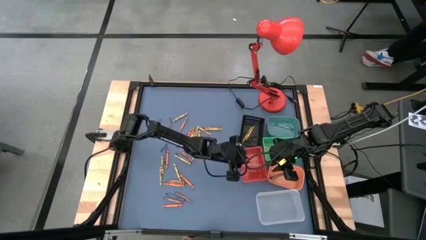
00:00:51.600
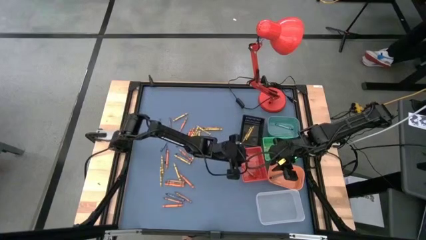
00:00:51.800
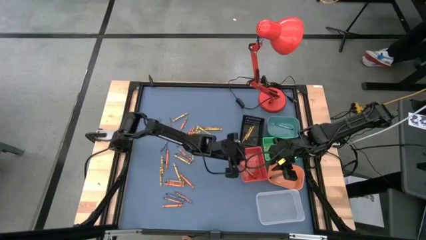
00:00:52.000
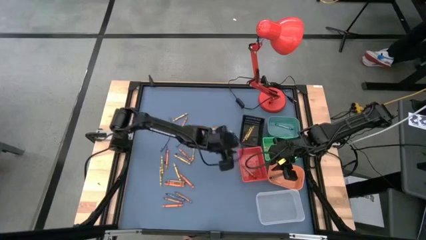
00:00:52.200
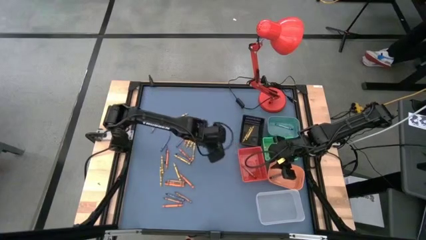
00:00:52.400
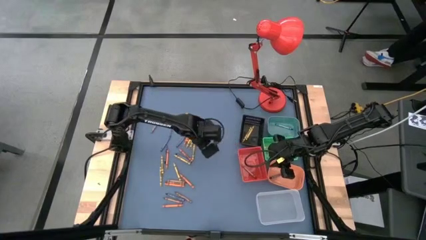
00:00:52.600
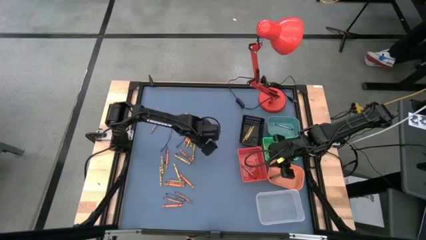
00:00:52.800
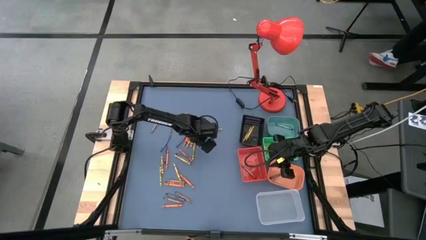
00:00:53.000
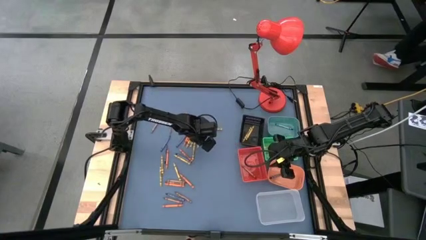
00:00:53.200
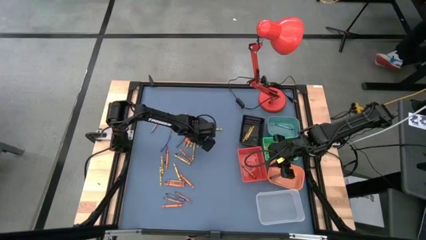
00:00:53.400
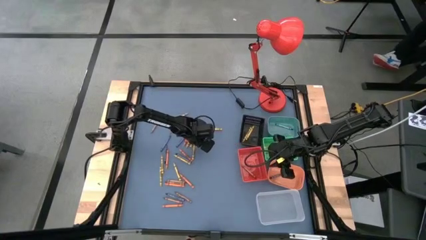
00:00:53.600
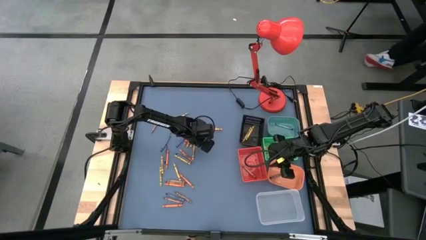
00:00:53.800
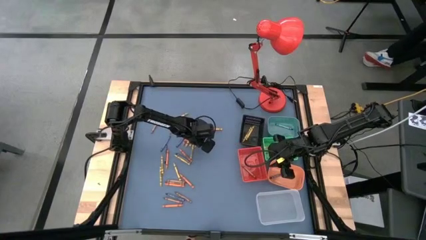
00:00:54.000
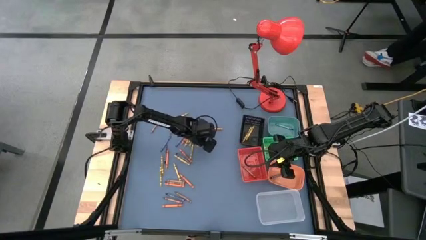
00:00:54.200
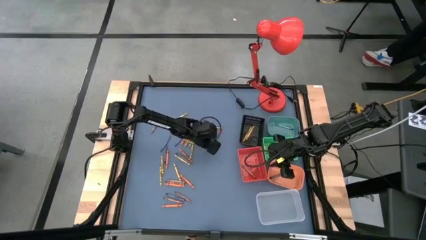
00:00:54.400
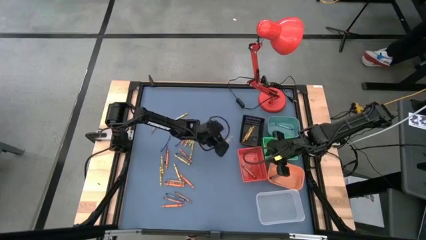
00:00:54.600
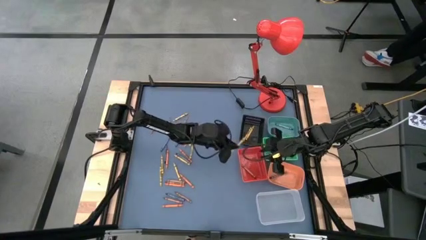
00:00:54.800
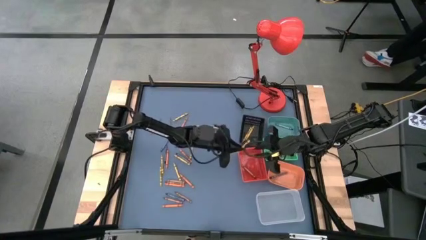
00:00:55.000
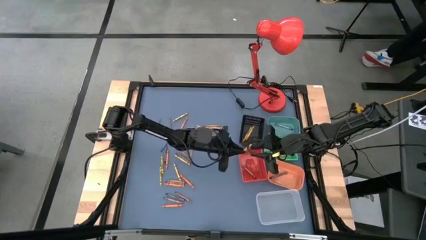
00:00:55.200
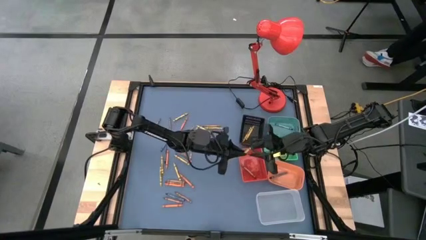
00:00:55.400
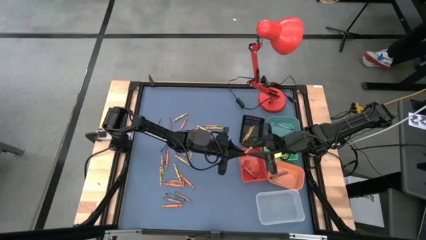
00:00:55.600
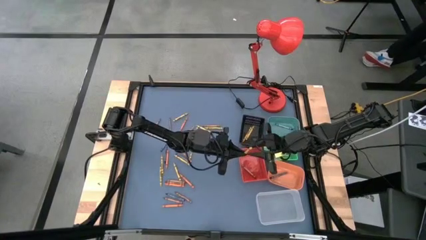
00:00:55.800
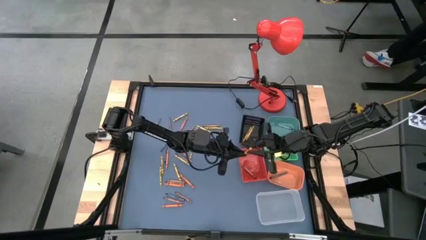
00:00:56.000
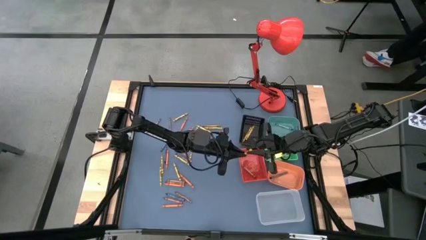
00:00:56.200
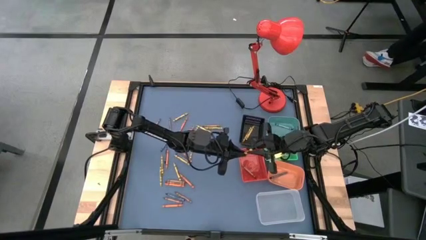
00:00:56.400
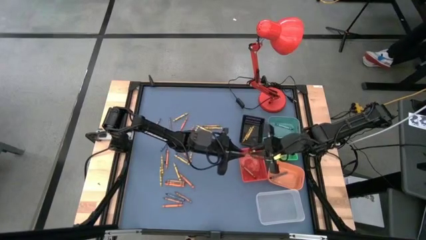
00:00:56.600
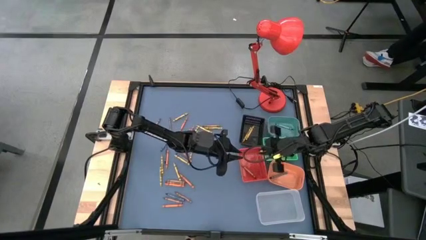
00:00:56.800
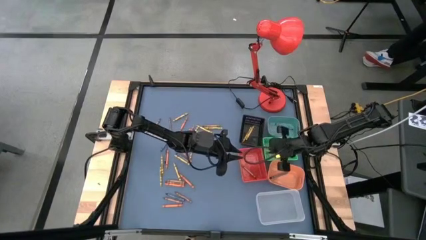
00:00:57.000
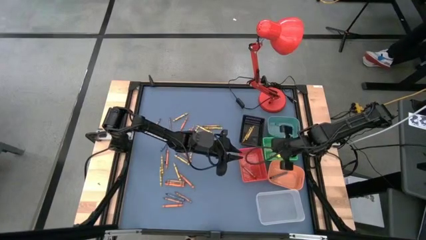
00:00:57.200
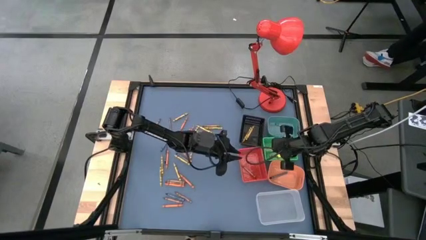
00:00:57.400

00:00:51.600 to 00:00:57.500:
Task: Sort crayons
Put the yellow green crayon into the green basket

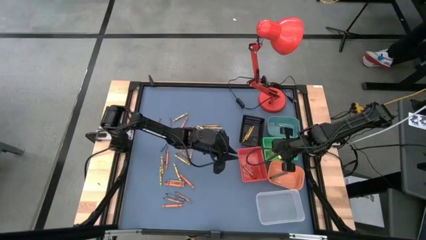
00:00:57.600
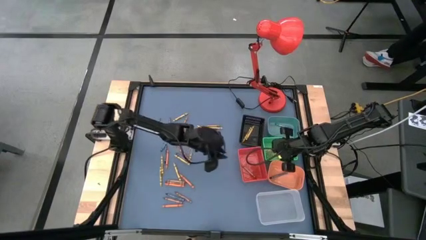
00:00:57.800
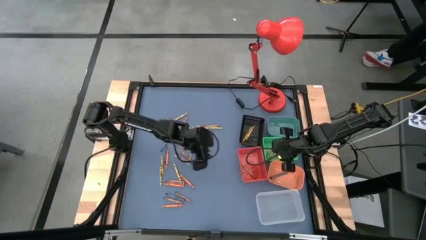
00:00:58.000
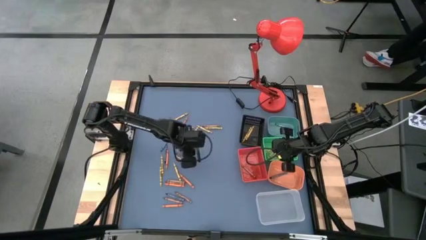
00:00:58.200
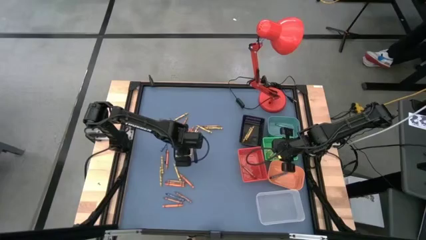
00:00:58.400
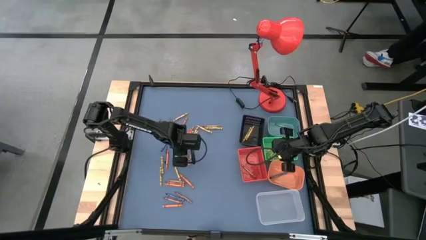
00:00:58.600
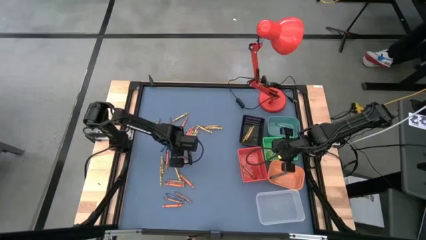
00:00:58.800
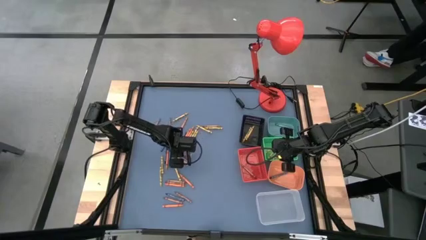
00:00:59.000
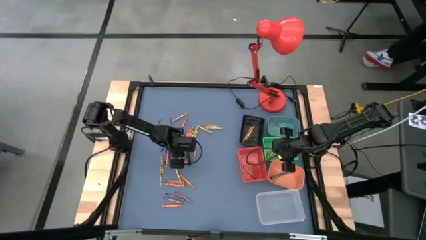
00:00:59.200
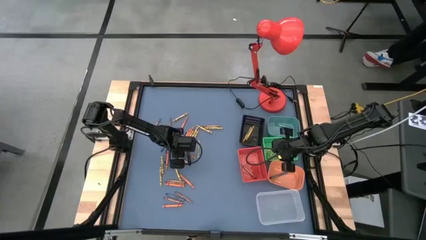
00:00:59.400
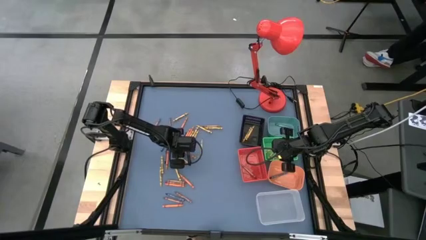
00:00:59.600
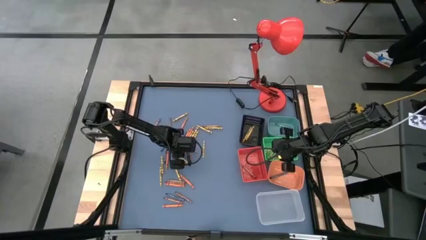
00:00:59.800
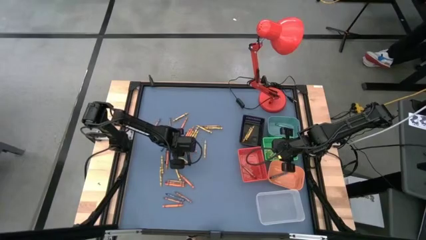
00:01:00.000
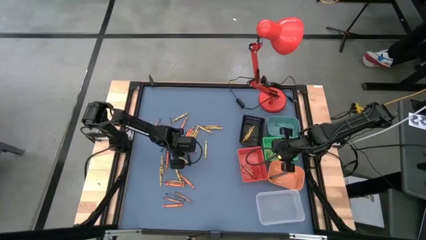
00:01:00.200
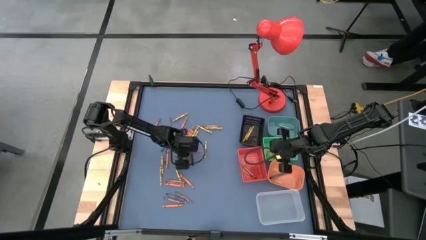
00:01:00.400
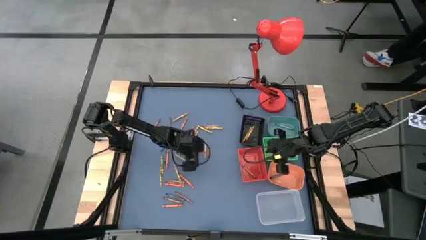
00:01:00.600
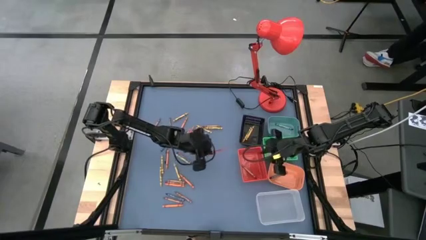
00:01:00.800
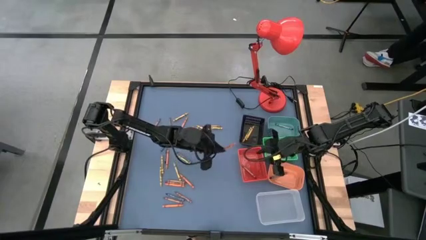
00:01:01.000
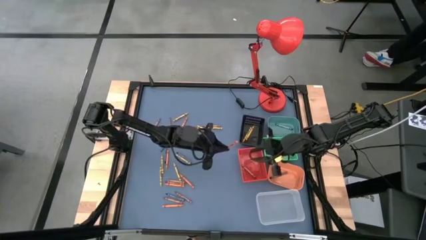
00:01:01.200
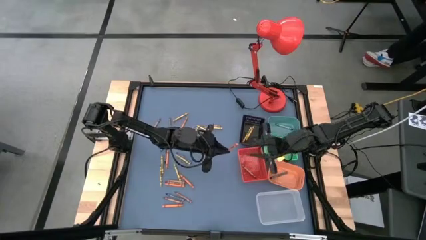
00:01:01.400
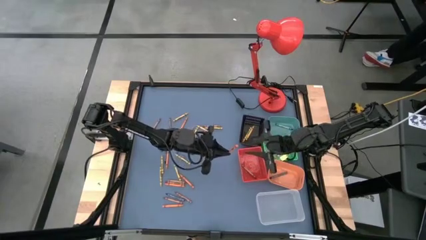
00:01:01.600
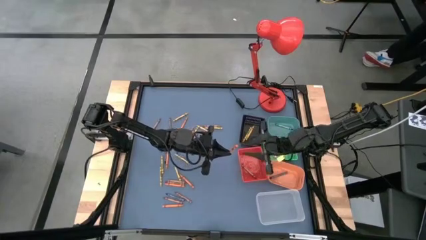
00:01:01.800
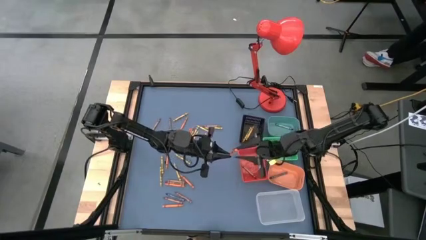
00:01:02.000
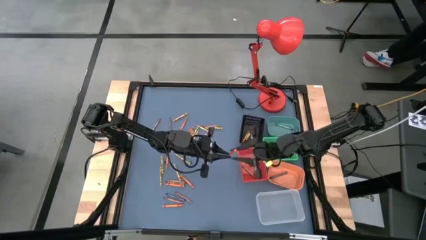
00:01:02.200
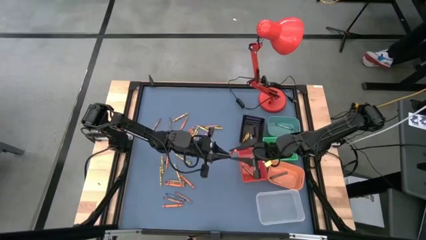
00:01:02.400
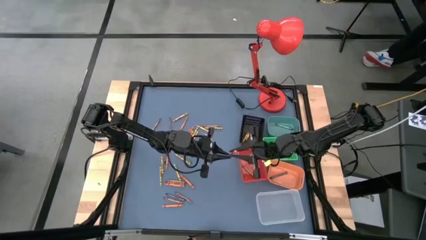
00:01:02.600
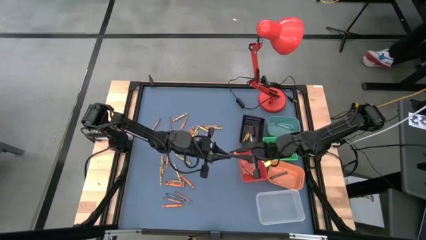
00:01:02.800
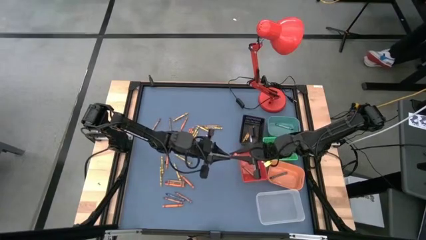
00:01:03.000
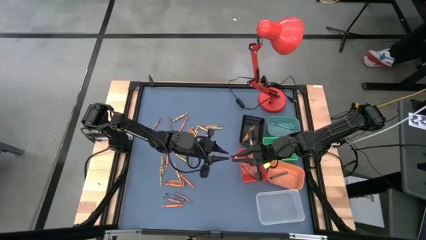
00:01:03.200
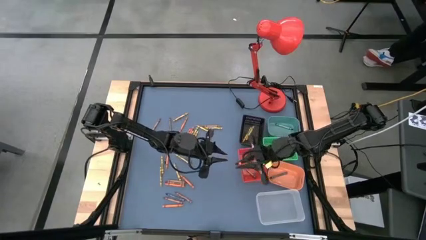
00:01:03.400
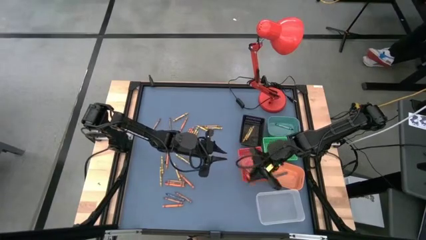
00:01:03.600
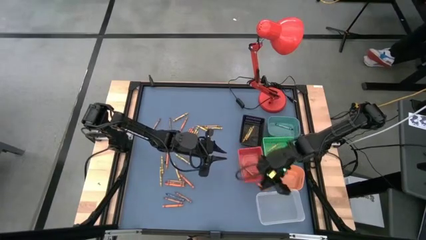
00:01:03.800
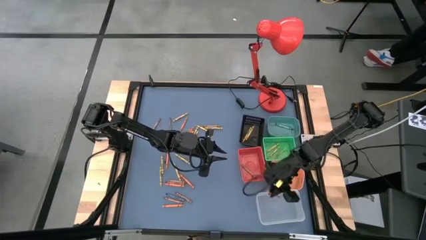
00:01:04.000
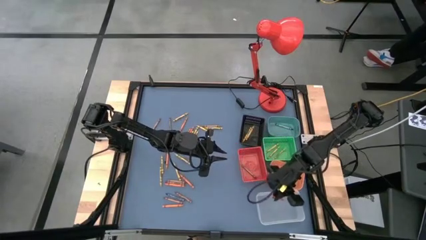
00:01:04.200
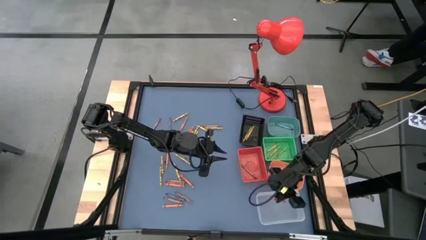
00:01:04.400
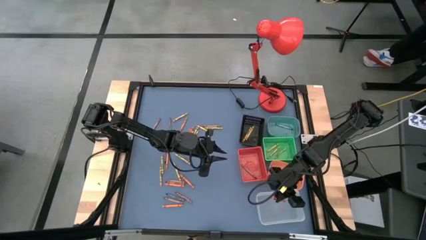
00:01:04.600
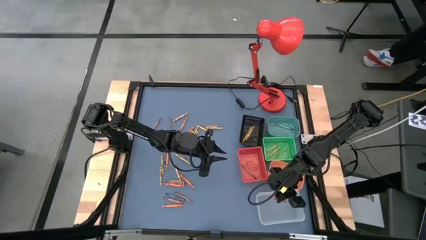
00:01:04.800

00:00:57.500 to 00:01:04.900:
Put the orange crayon into the transparent bin

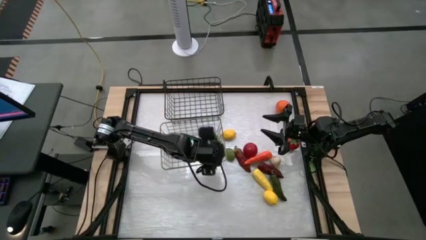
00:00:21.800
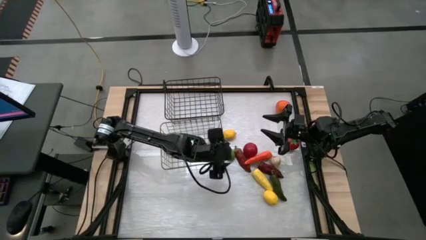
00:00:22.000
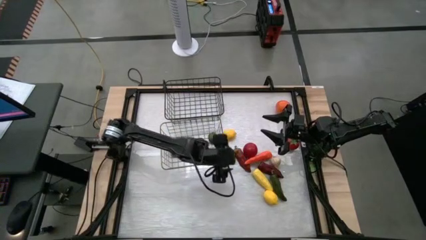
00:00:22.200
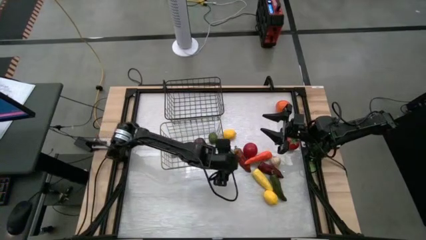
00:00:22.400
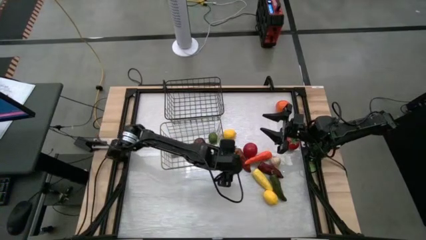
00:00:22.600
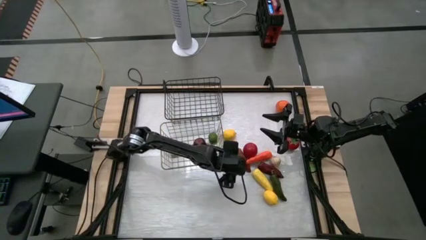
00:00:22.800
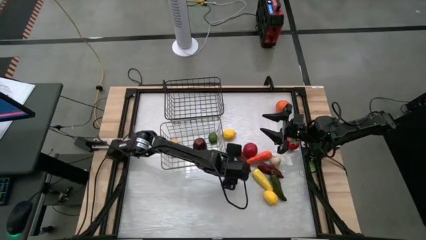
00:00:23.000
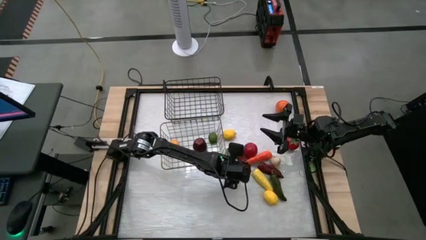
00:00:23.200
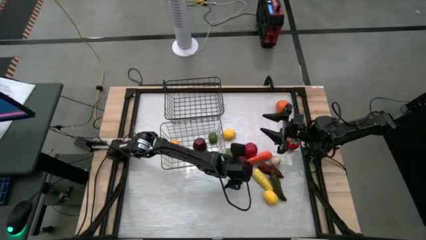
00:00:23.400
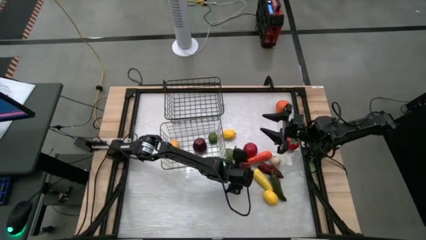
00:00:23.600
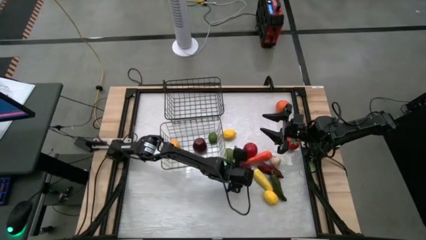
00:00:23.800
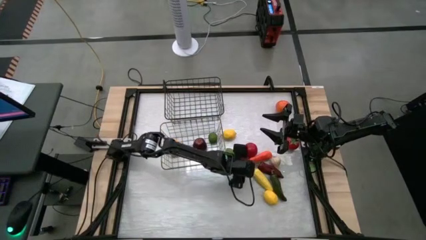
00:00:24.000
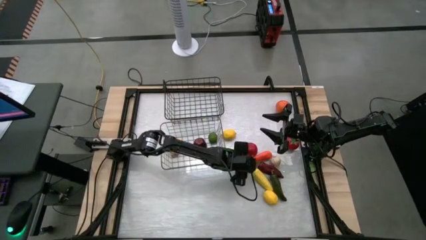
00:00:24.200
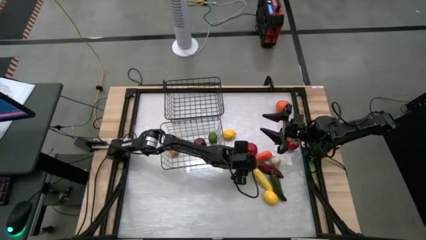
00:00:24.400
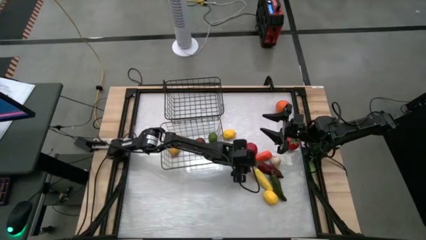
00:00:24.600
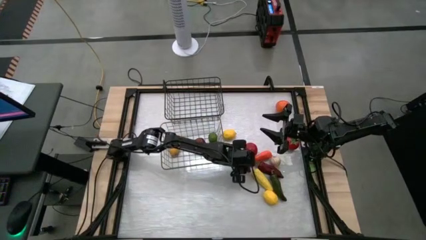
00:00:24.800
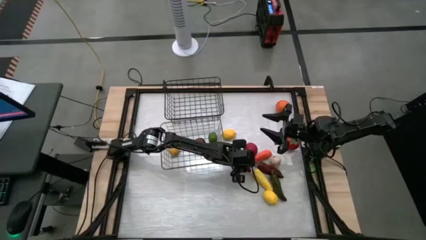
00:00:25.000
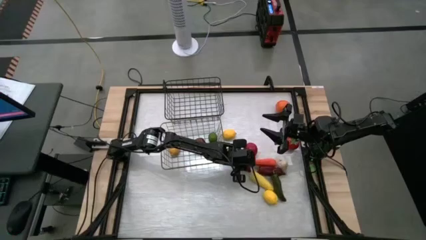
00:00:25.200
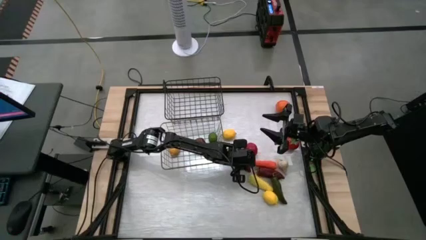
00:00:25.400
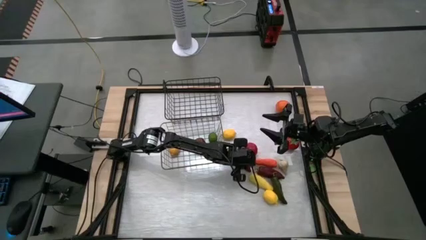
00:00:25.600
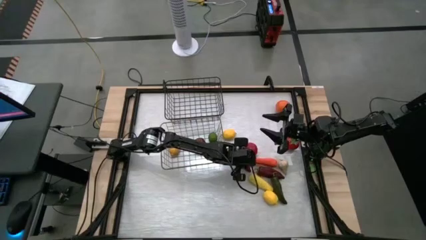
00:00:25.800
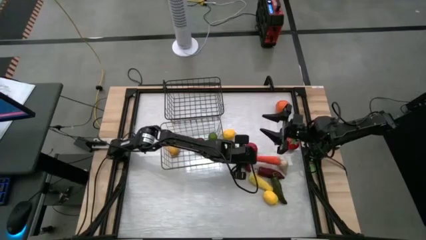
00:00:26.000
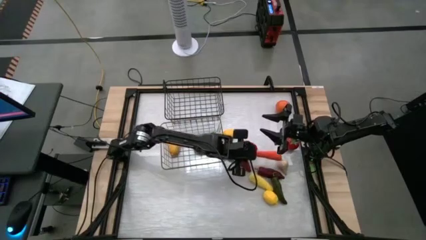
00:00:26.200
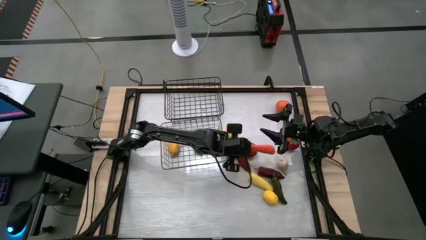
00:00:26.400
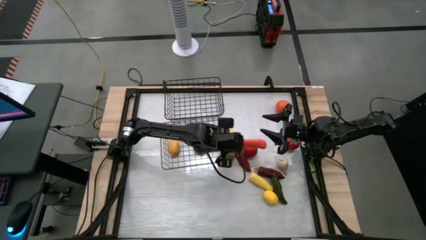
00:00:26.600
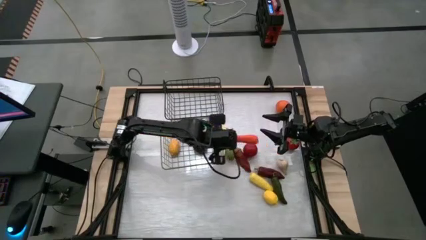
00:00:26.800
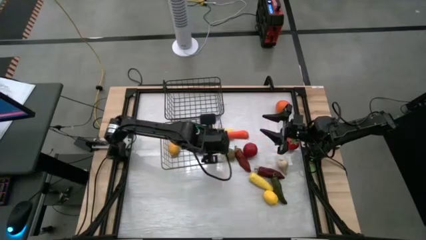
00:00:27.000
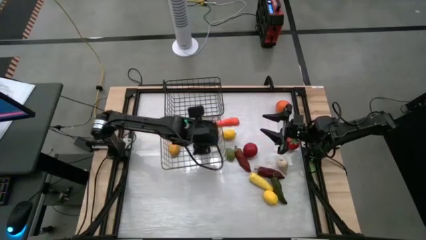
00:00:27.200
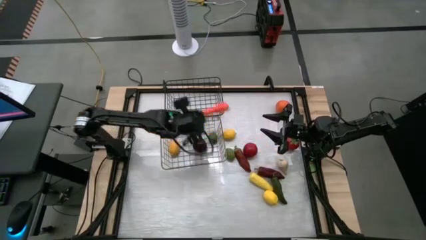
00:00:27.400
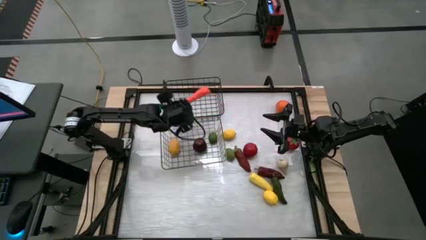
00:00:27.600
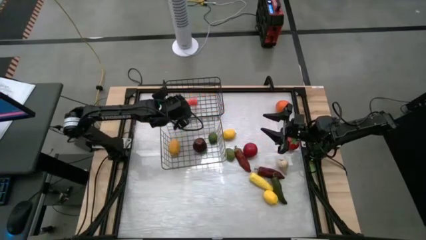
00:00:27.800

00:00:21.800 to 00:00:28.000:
Task: Sort produce into baskets
Put the carrot into the black wire basket
